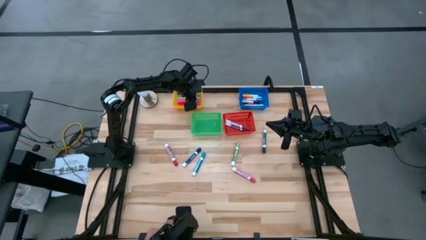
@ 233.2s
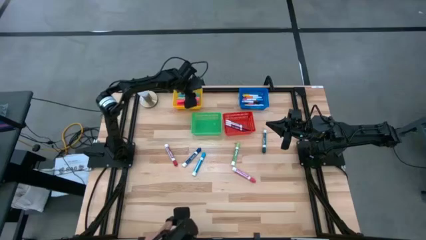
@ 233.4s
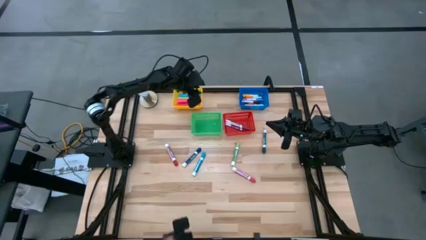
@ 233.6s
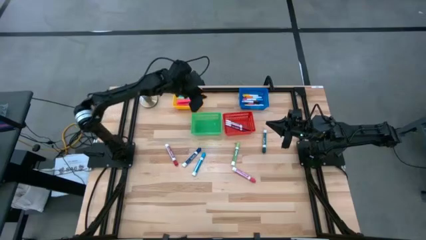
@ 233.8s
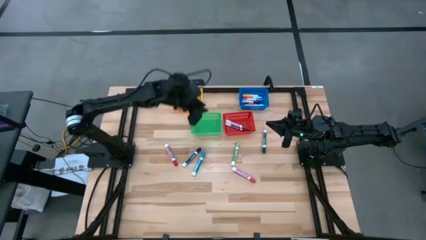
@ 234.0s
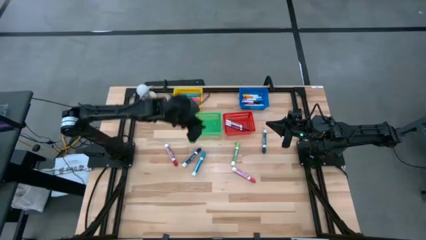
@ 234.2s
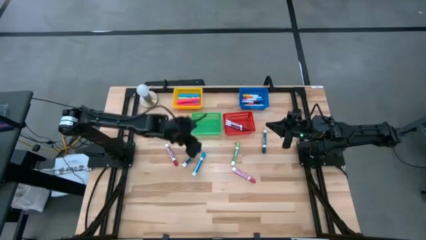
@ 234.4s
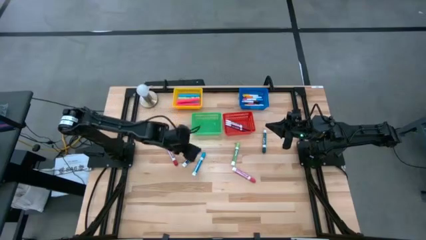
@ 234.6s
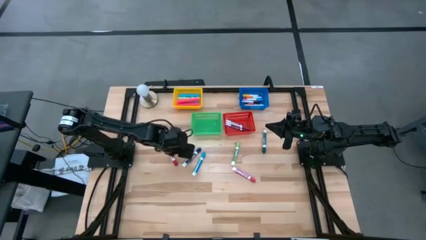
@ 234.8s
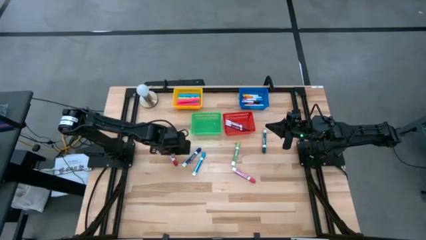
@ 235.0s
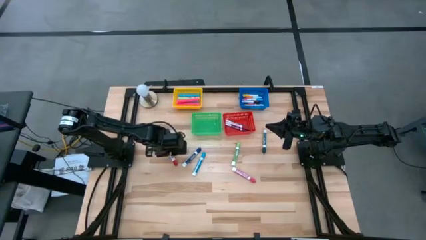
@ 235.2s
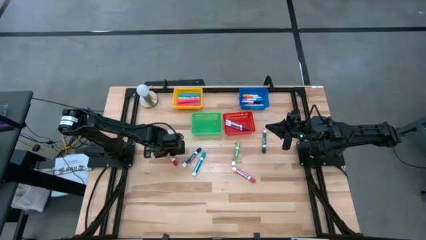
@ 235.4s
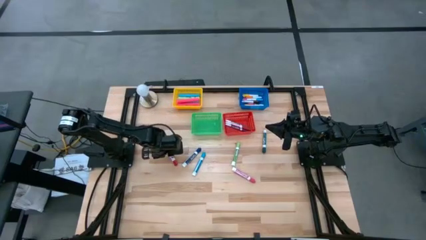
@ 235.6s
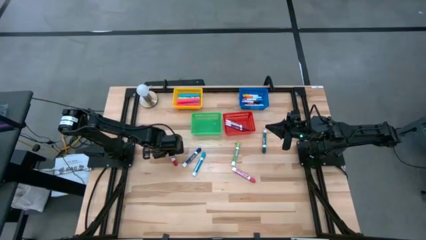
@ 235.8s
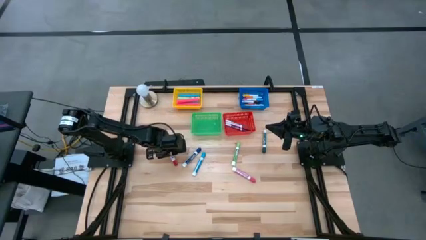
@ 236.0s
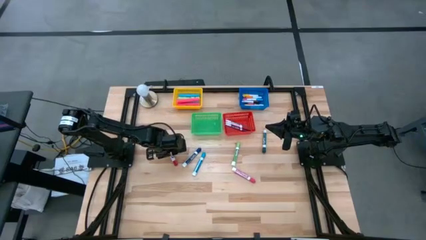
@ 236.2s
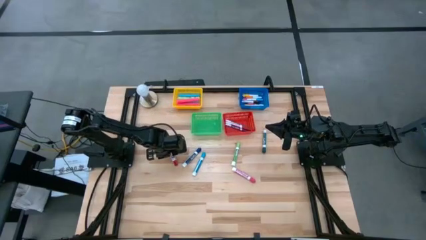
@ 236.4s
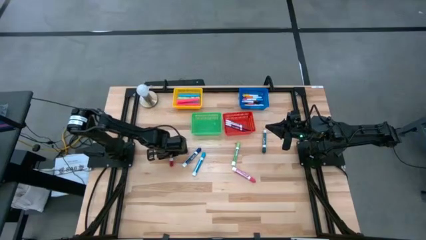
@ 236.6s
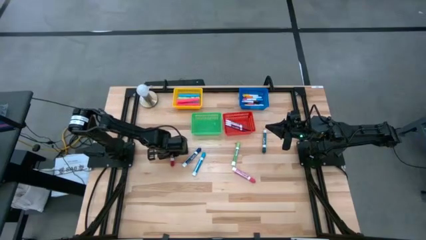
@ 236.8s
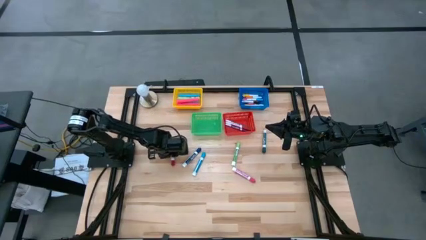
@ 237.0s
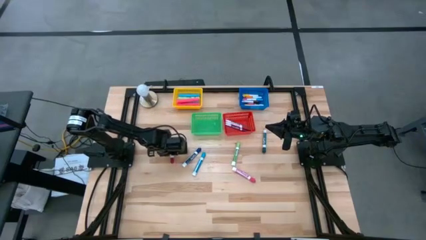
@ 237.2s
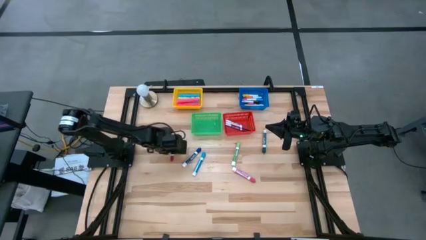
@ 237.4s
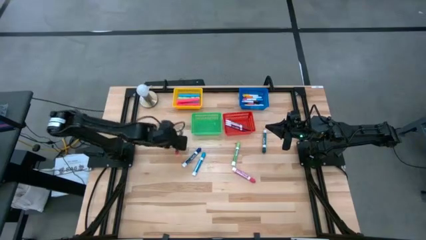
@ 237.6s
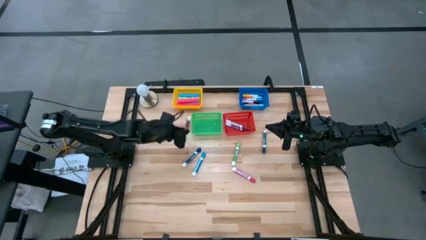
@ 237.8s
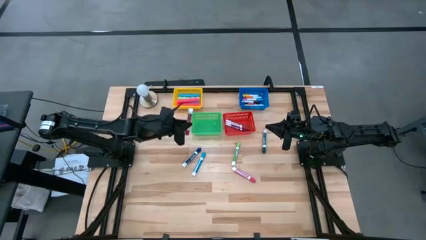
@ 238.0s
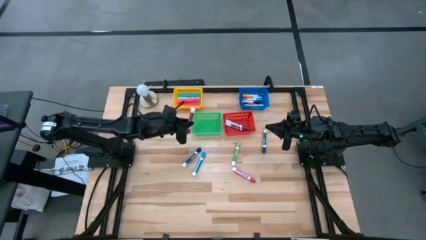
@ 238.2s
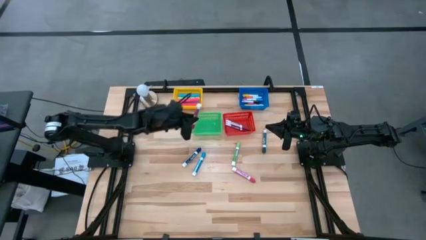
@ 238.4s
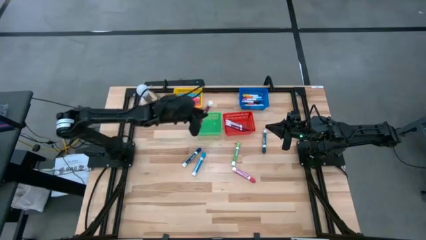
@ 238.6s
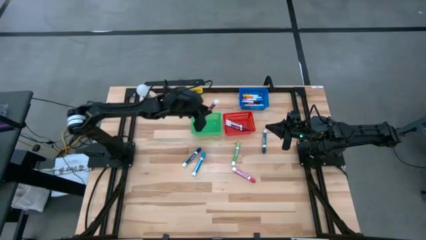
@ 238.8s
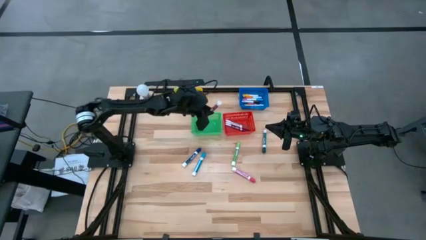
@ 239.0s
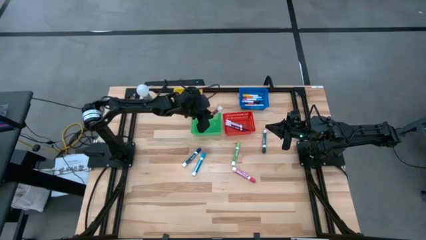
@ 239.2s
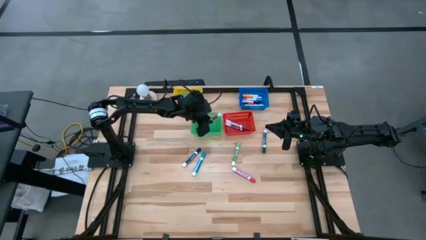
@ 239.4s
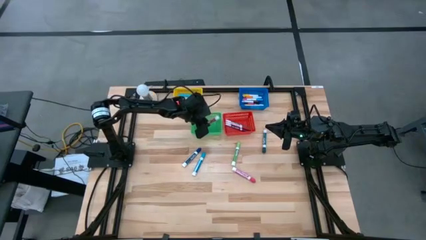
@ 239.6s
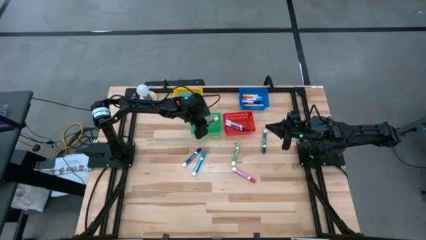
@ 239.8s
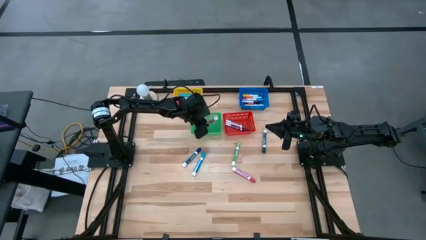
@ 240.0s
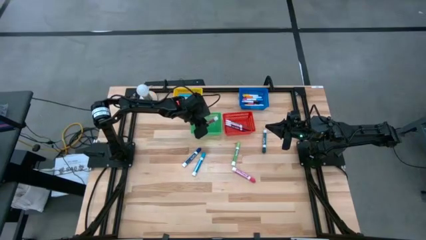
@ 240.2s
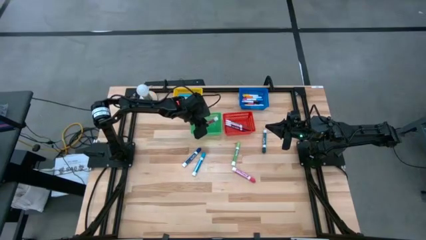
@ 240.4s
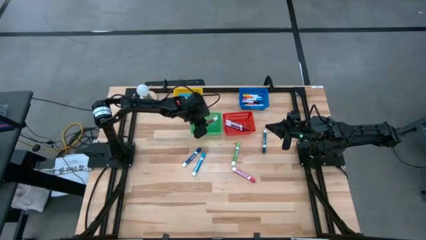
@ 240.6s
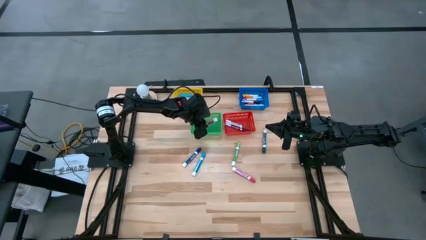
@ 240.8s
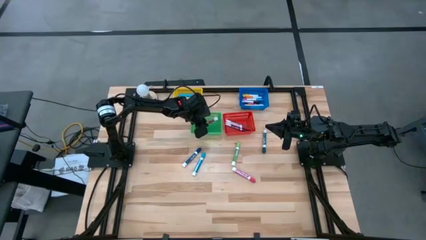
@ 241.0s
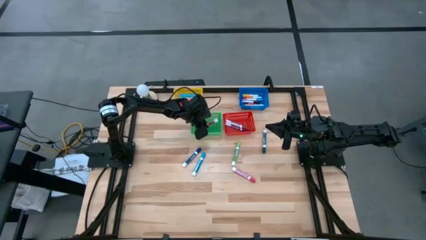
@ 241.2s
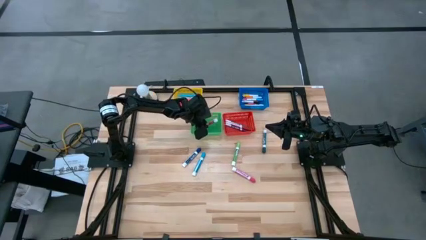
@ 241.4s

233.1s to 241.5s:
Task: Pick & Place Markers
Put the large red marker into the green bin

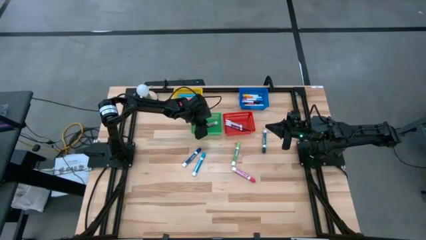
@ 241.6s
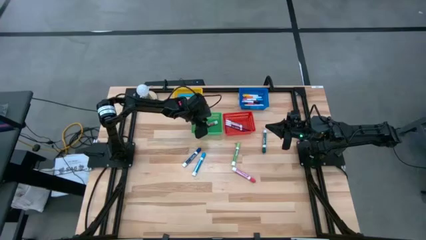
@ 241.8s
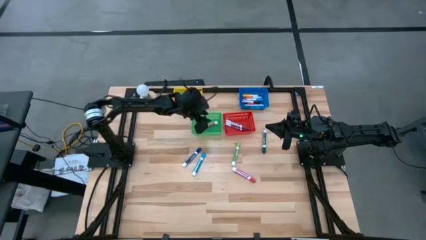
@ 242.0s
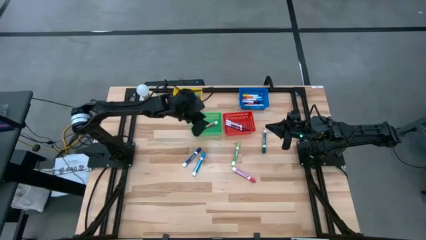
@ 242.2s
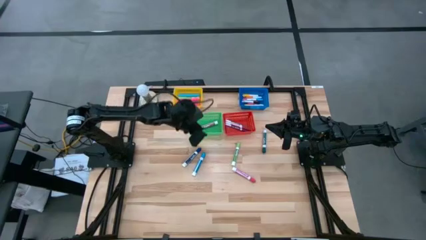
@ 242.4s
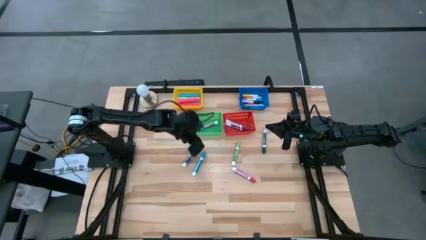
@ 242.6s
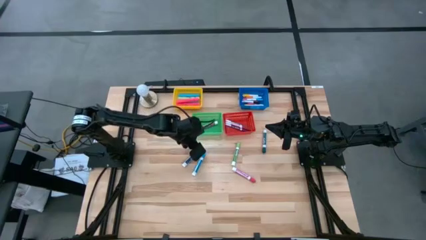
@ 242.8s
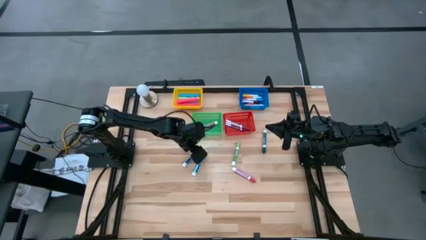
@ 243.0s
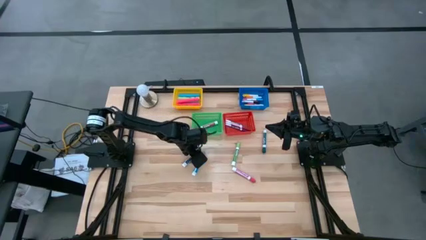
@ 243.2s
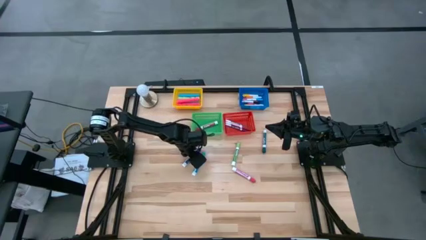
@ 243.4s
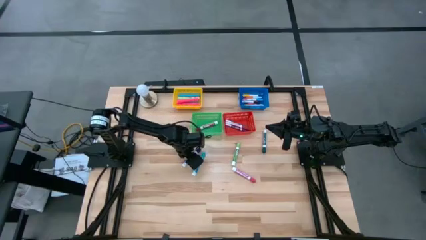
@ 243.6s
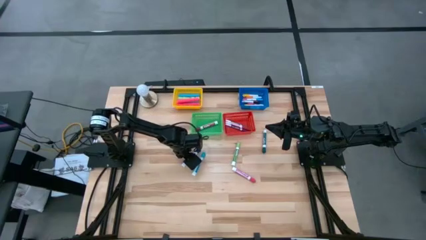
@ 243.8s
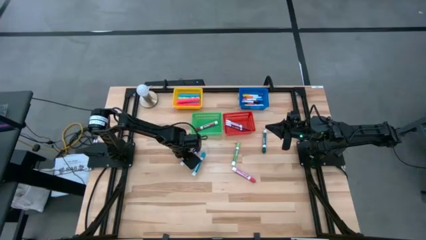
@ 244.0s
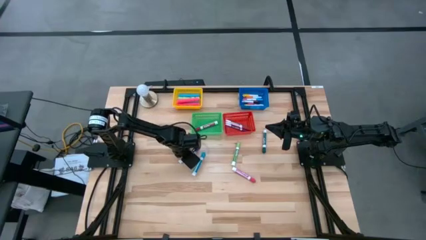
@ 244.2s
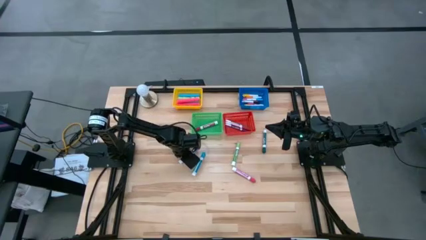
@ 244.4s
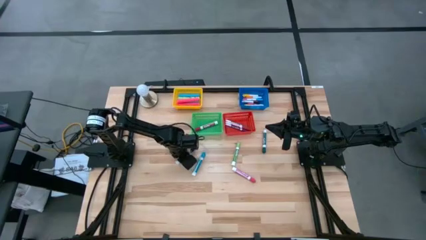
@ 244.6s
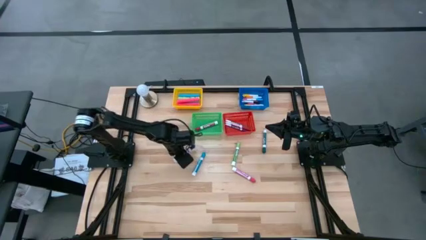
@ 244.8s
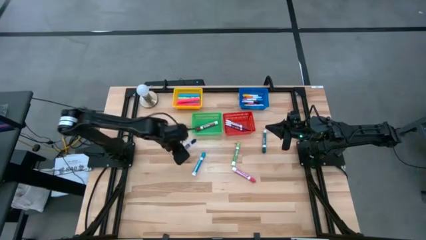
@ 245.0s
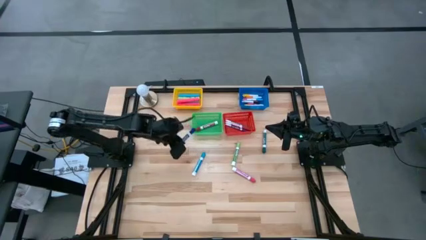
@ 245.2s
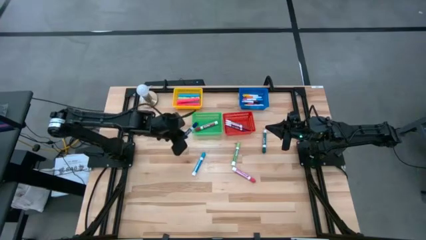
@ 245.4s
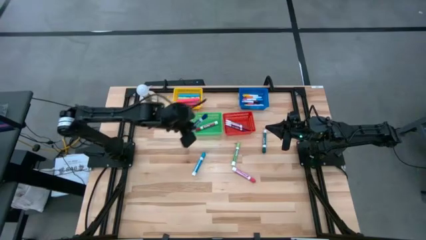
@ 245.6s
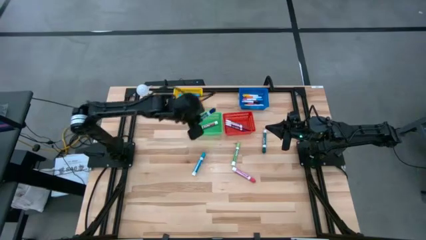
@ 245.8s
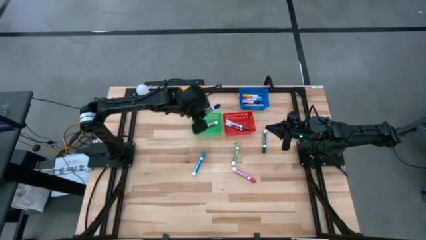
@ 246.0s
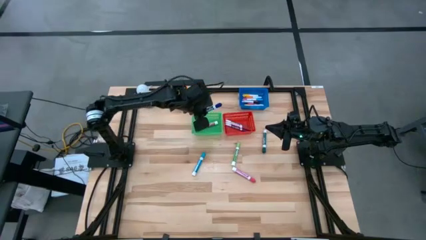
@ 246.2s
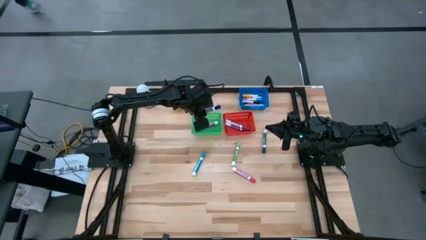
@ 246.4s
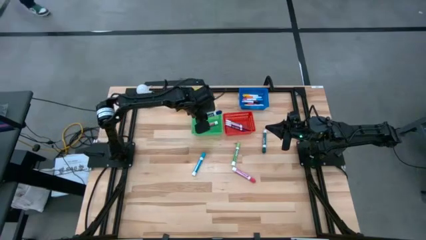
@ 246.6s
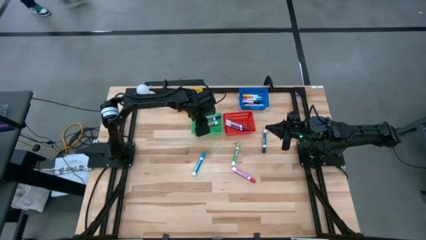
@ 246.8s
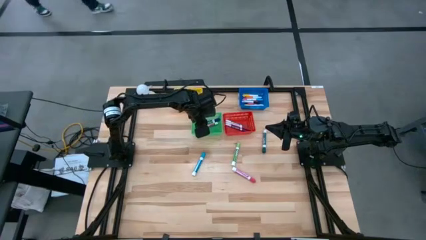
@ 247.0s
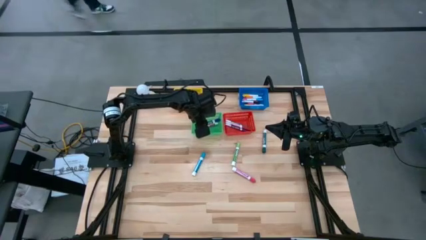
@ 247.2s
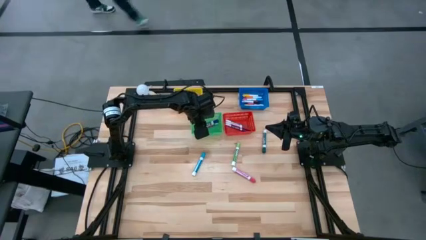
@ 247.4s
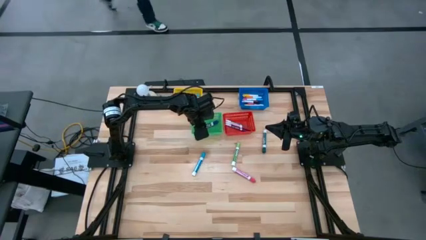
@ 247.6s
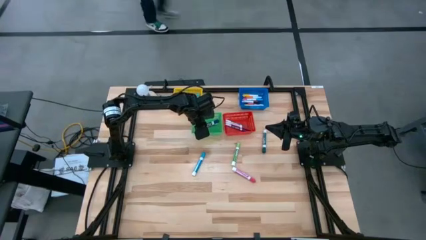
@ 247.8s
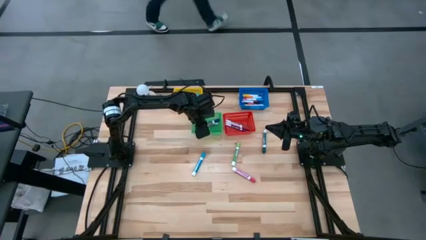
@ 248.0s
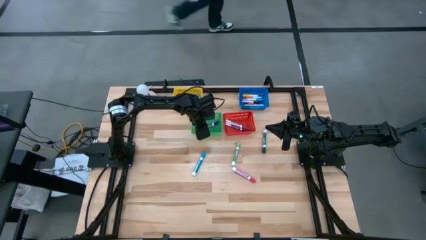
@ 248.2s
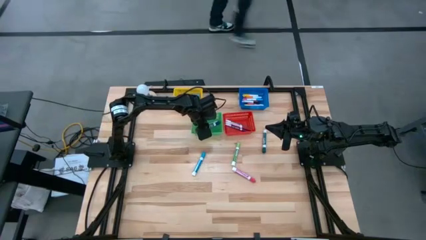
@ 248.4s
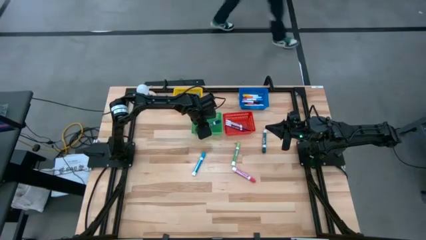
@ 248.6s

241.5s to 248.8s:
Put the large blue marker into the green bin
